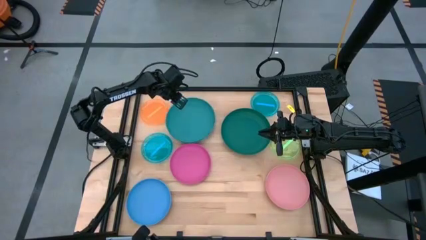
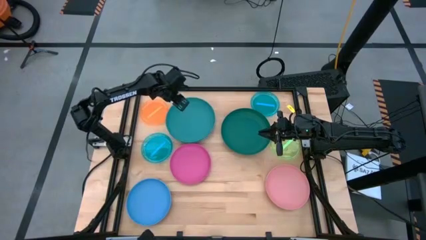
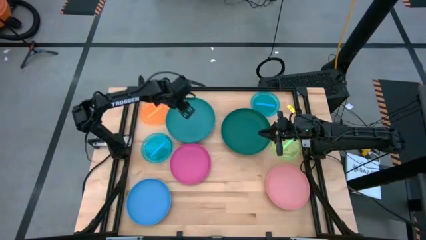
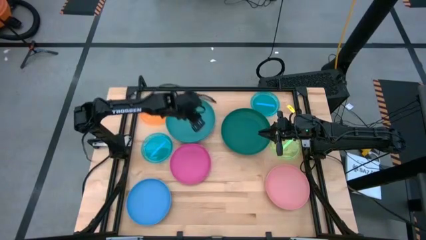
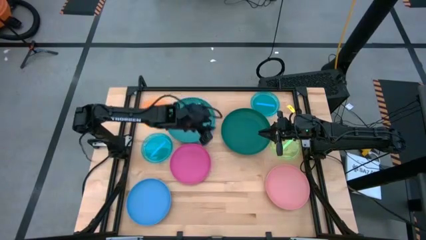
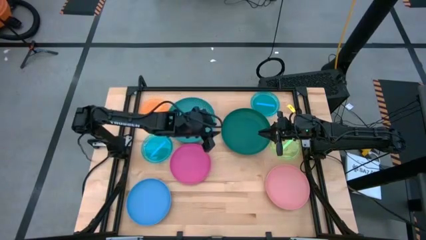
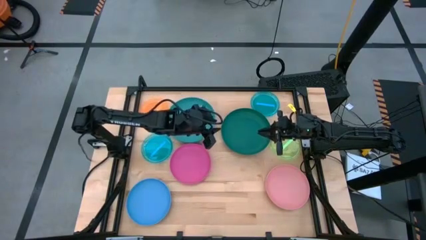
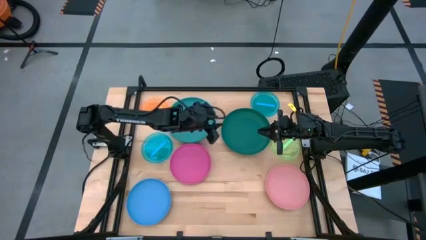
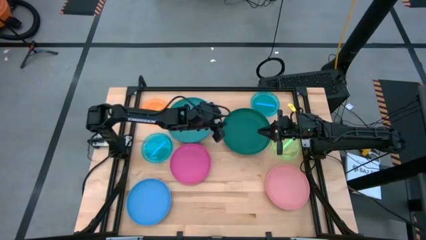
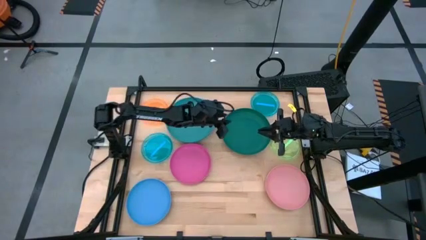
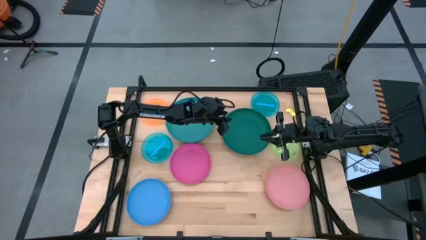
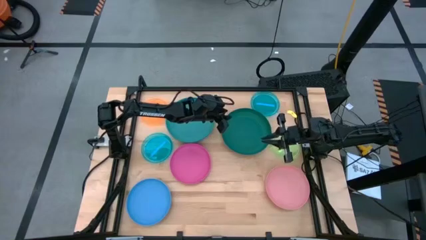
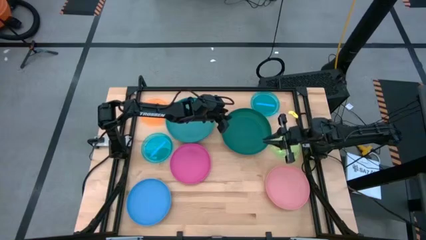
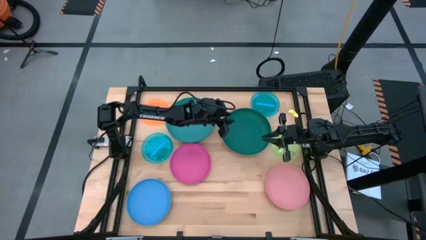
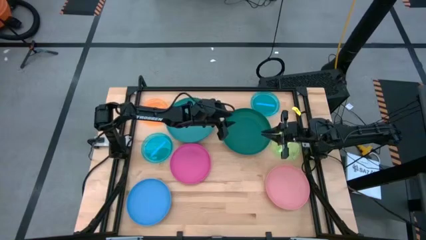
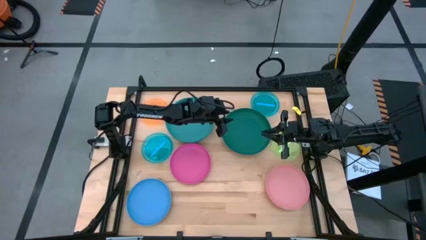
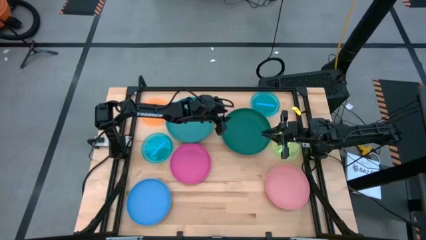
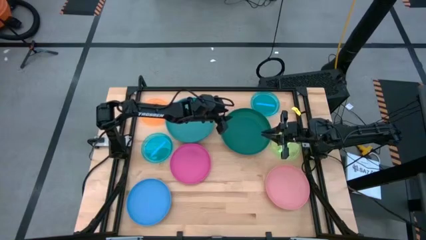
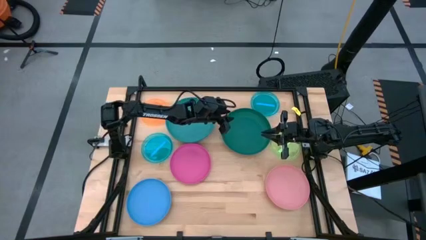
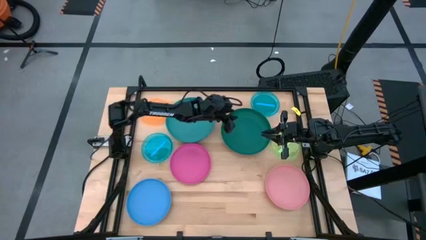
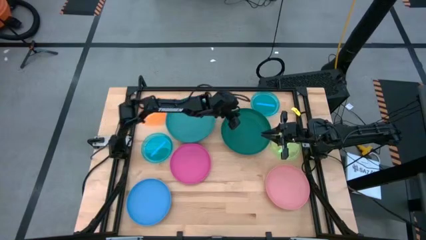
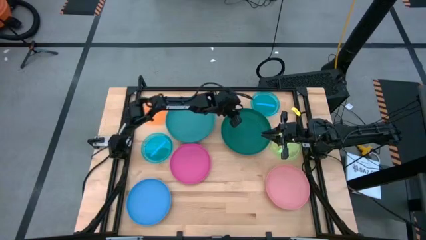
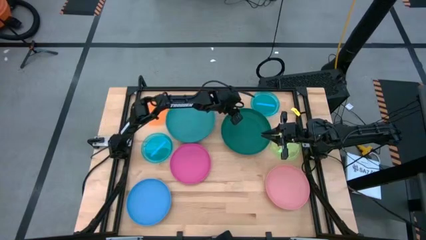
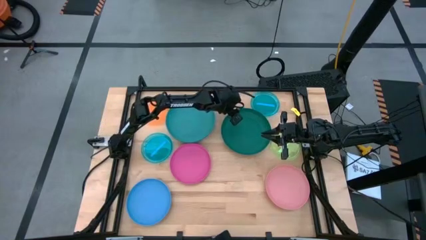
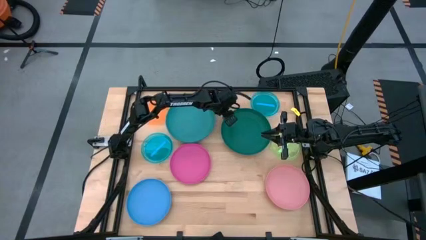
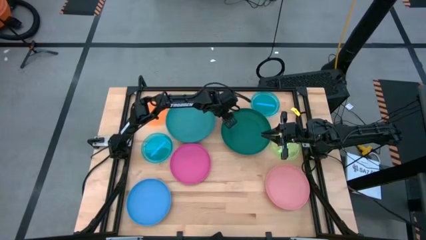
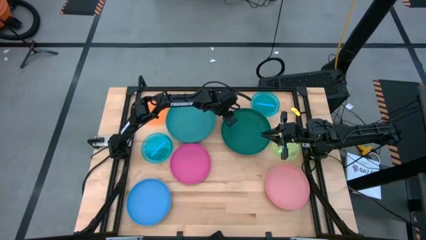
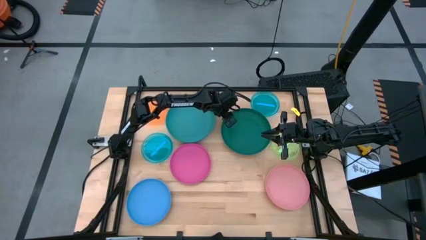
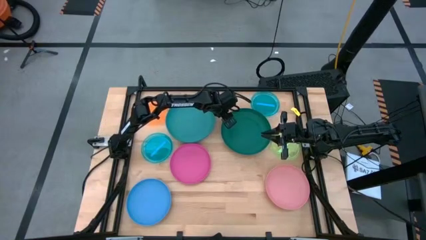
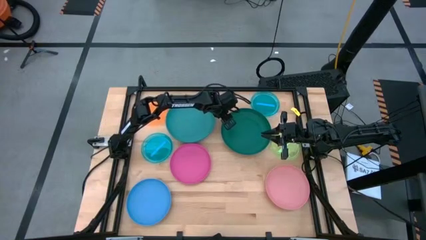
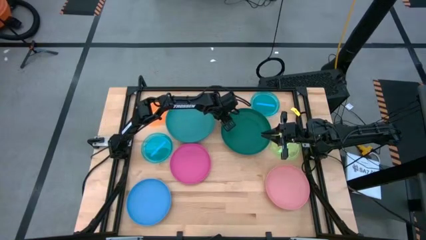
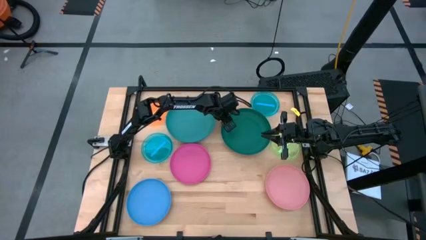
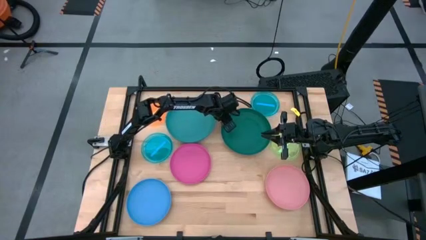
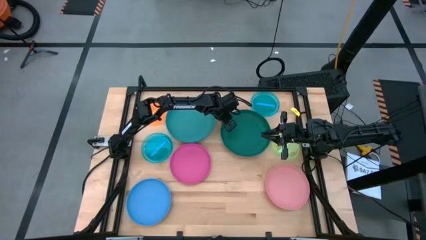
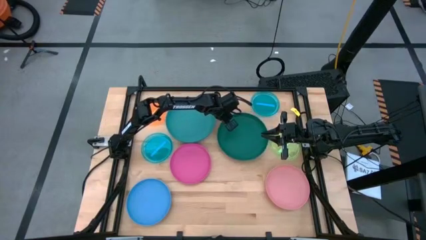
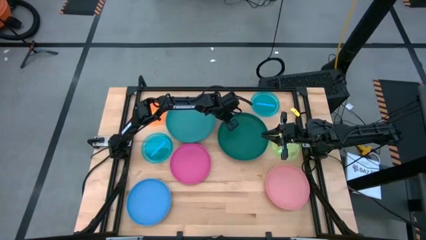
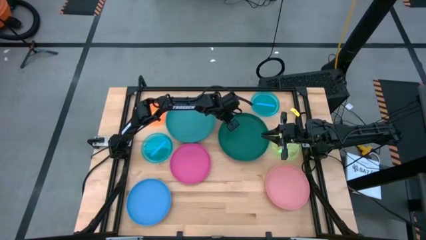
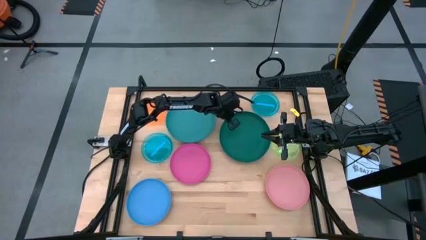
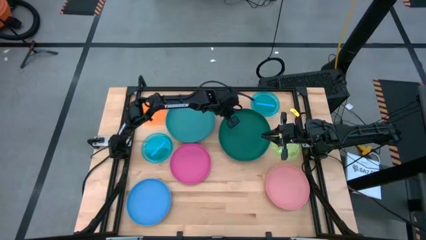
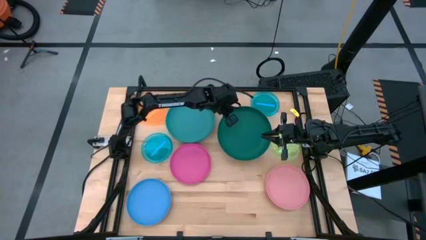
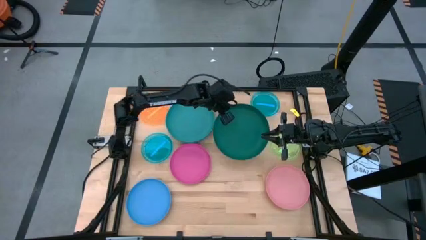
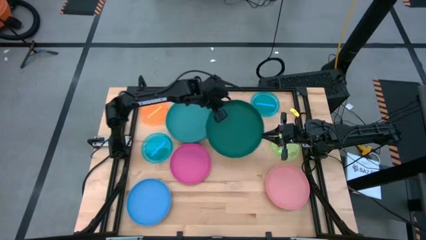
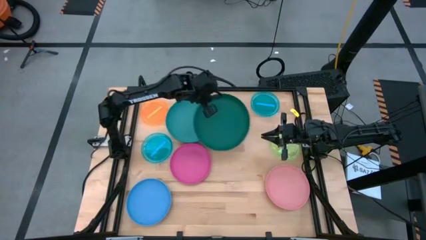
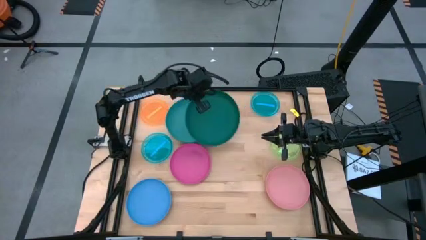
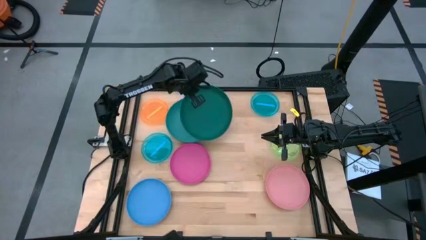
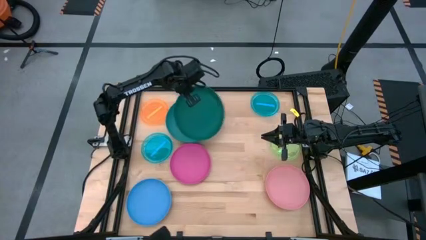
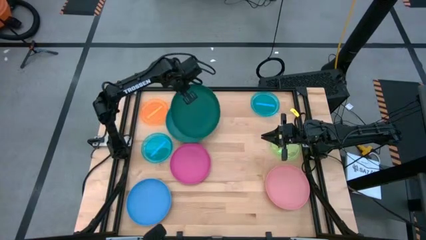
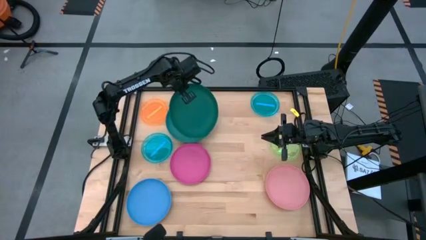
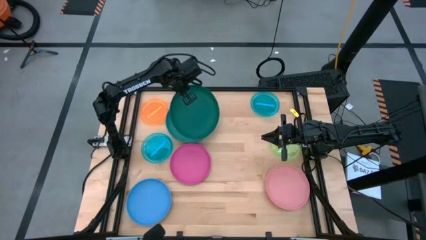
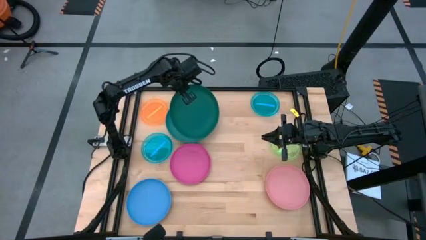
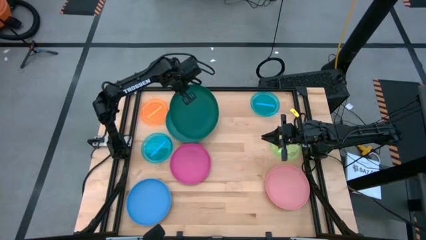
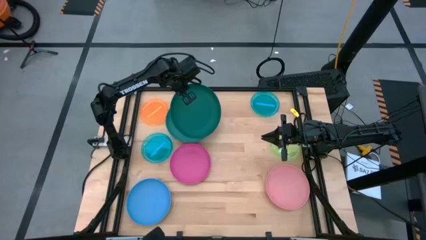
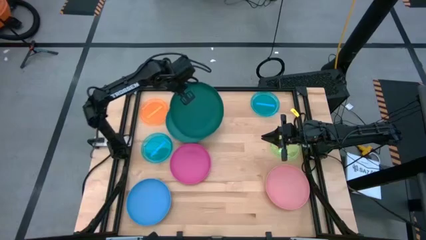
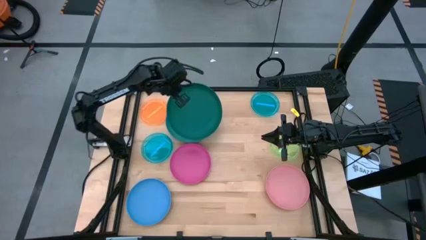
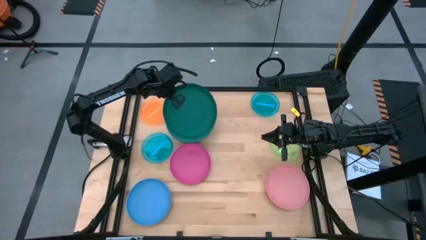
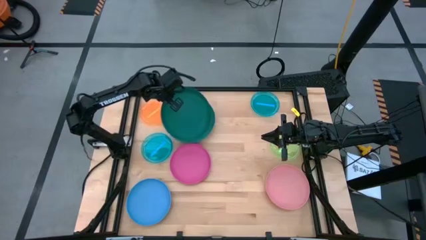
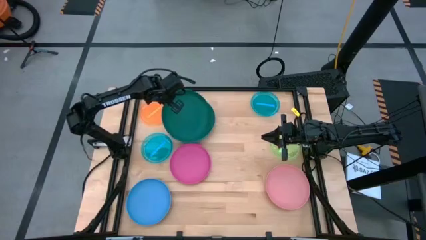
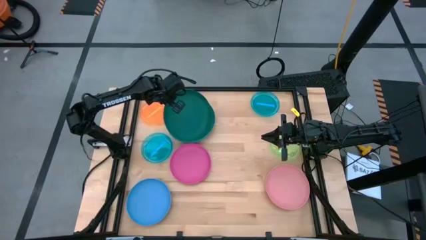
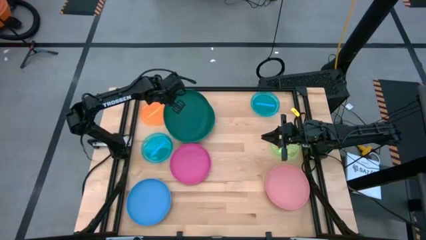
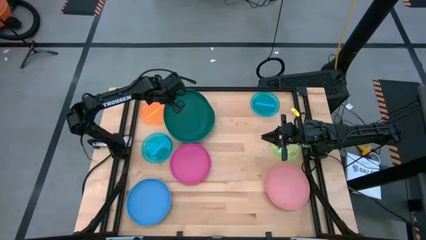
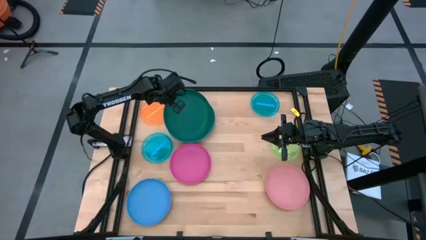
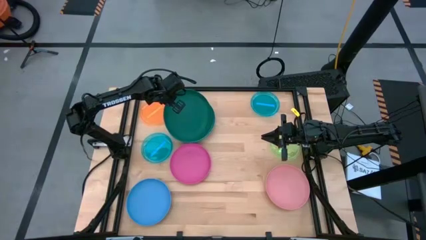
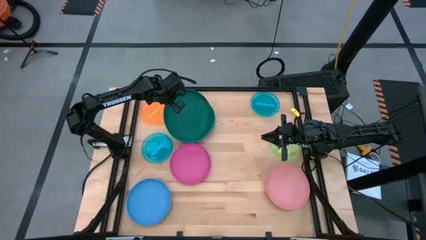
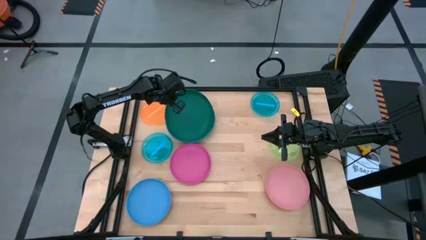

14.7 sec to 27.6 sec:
Task: Stack plastic plates
Stack the big green plate on top of the big blue plate
